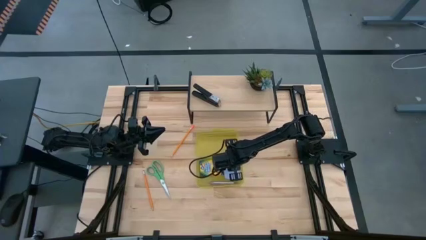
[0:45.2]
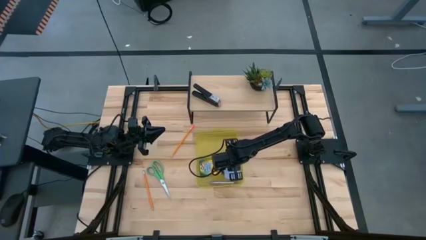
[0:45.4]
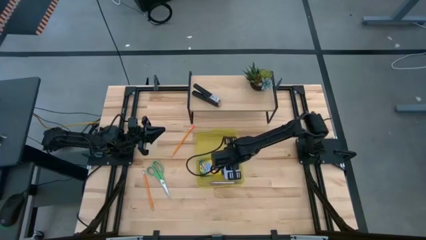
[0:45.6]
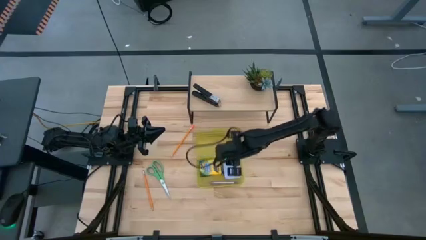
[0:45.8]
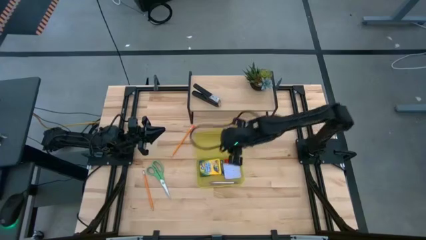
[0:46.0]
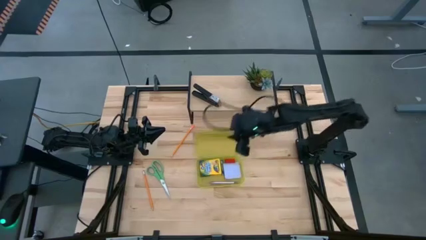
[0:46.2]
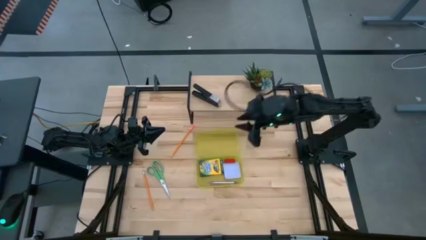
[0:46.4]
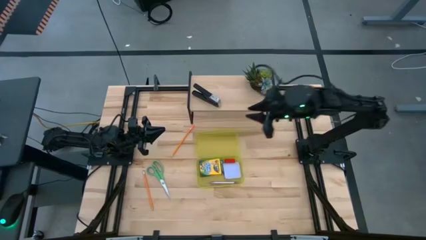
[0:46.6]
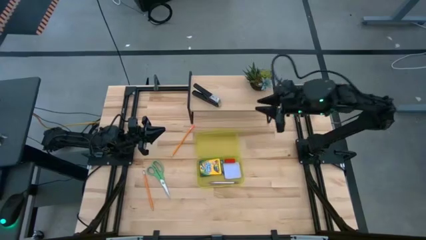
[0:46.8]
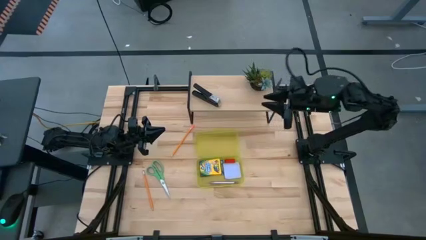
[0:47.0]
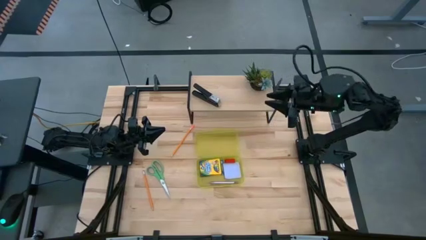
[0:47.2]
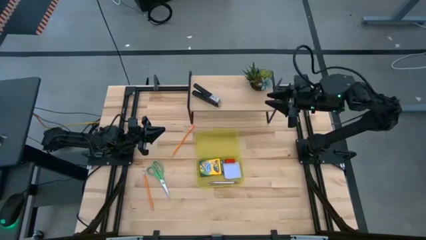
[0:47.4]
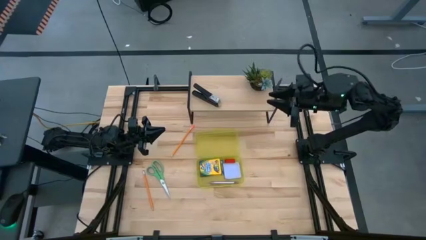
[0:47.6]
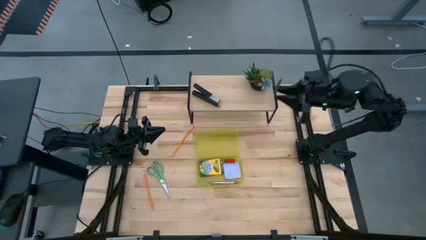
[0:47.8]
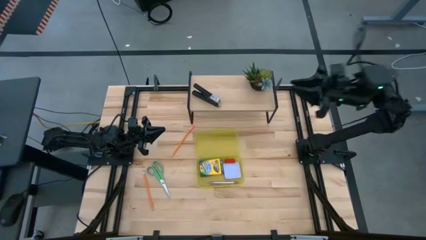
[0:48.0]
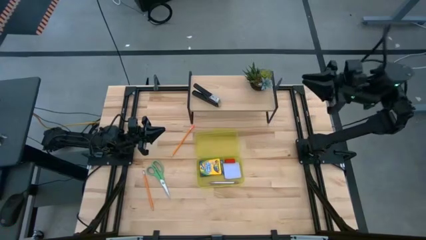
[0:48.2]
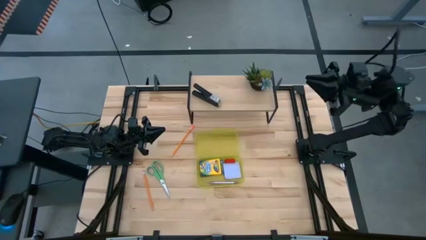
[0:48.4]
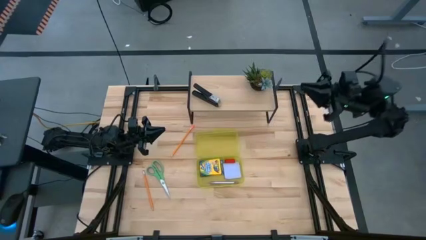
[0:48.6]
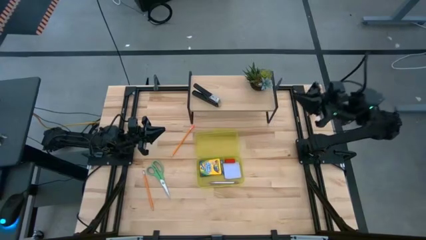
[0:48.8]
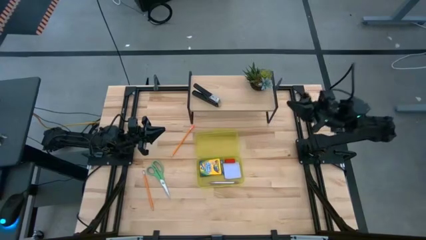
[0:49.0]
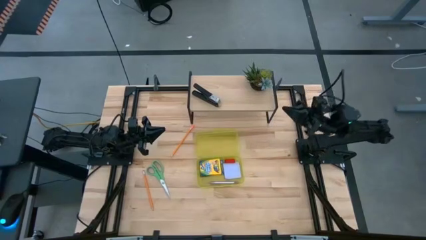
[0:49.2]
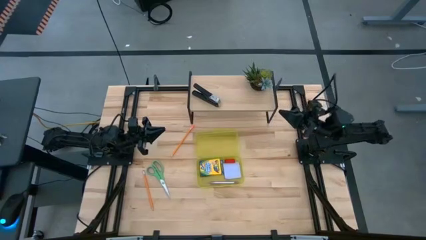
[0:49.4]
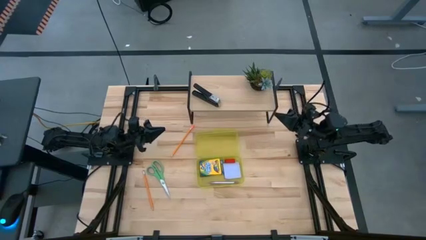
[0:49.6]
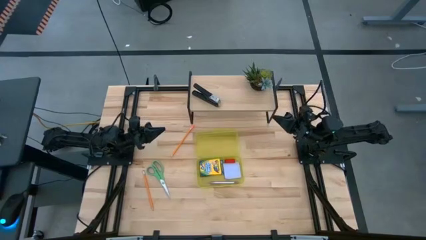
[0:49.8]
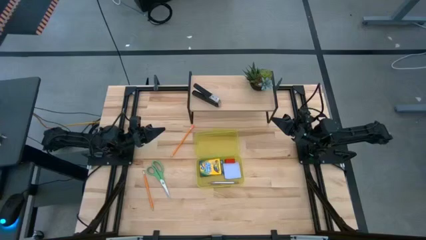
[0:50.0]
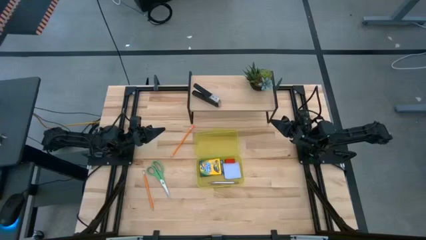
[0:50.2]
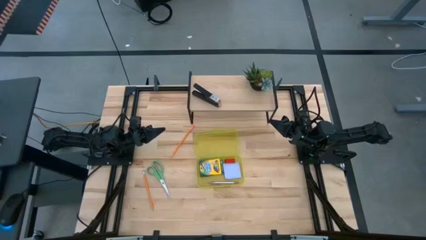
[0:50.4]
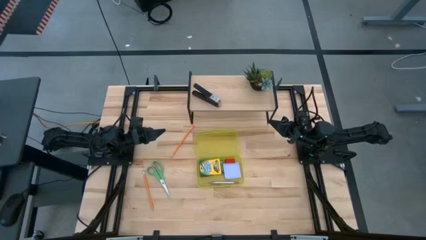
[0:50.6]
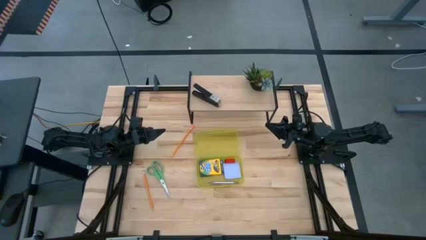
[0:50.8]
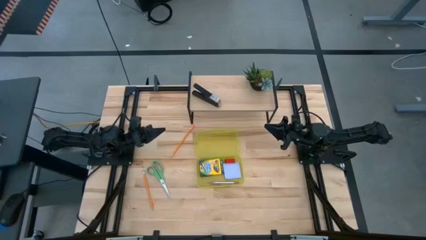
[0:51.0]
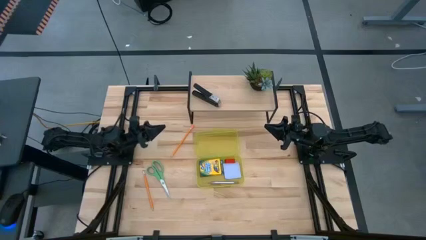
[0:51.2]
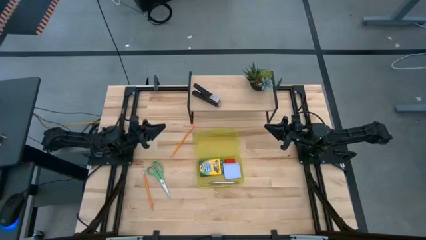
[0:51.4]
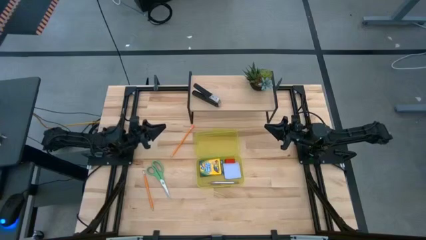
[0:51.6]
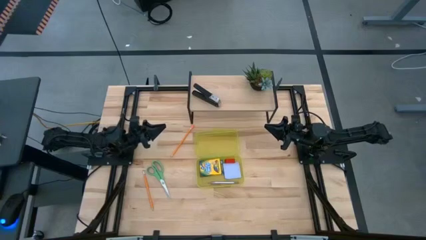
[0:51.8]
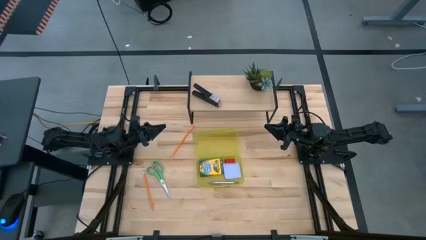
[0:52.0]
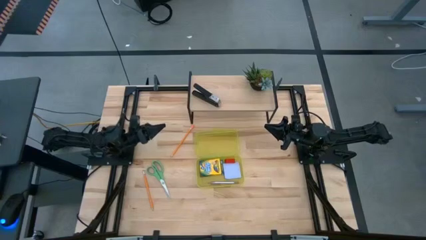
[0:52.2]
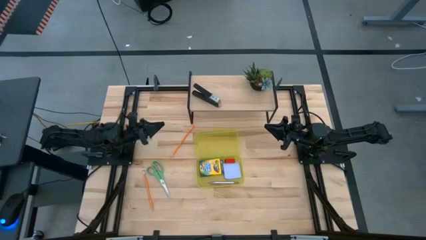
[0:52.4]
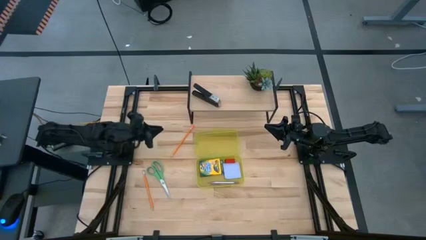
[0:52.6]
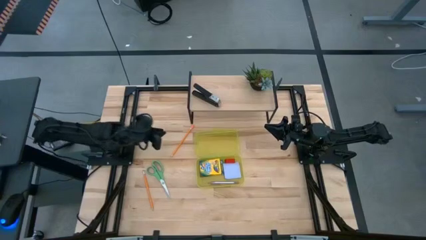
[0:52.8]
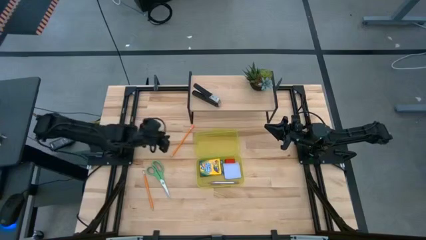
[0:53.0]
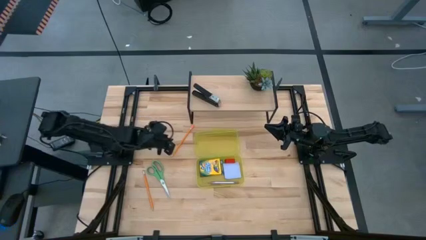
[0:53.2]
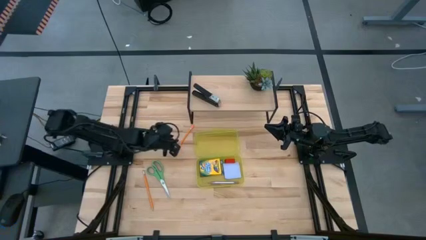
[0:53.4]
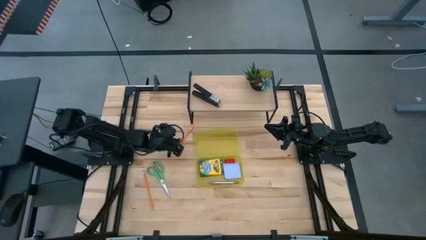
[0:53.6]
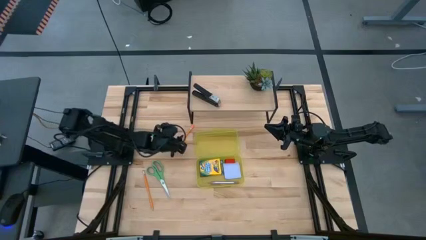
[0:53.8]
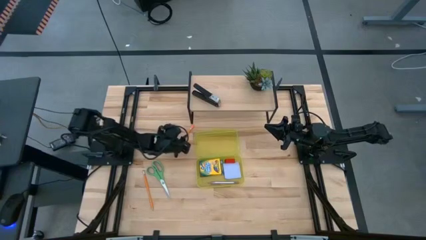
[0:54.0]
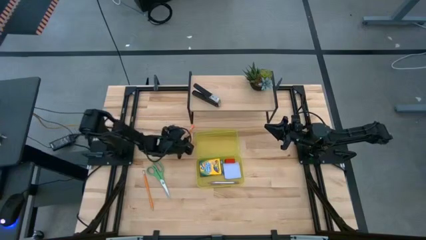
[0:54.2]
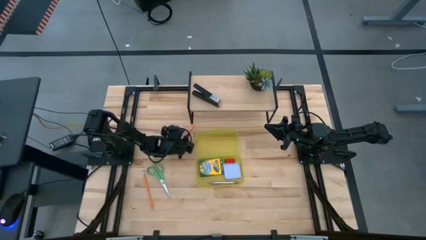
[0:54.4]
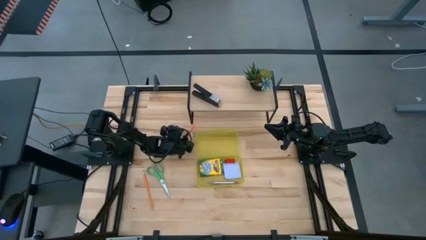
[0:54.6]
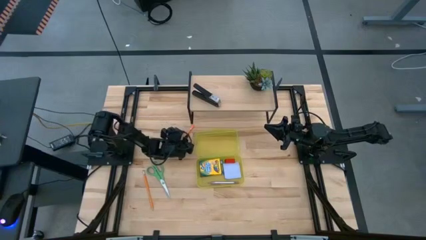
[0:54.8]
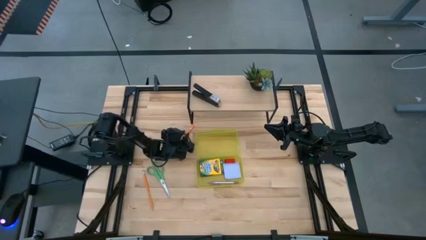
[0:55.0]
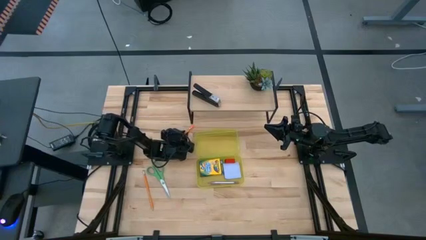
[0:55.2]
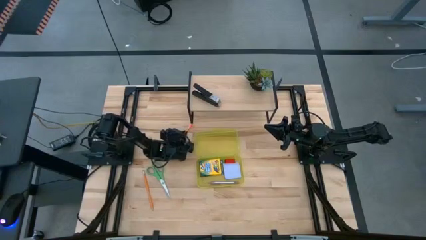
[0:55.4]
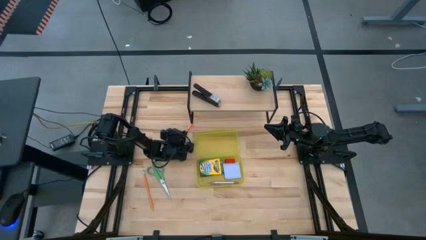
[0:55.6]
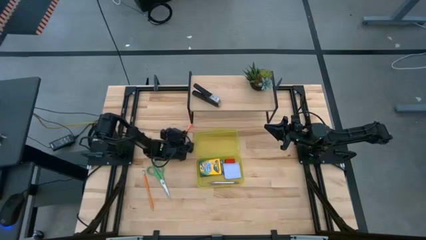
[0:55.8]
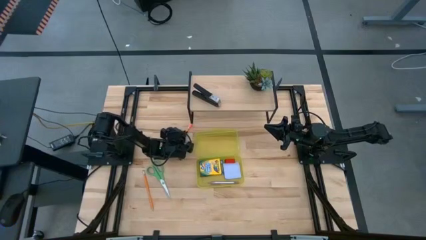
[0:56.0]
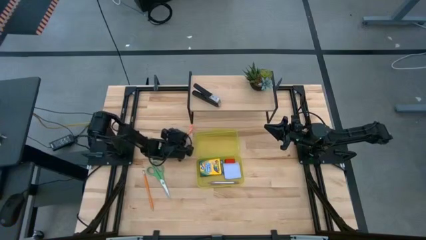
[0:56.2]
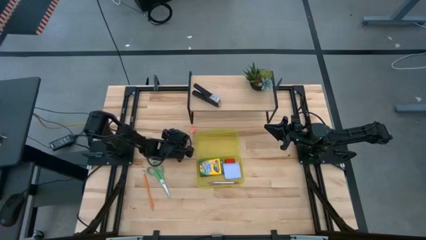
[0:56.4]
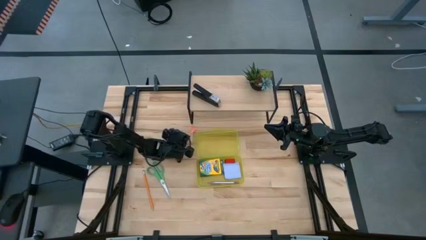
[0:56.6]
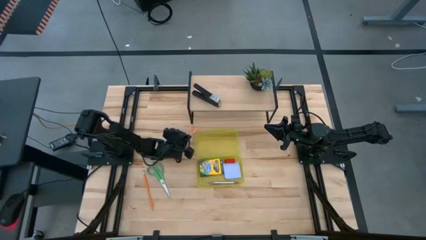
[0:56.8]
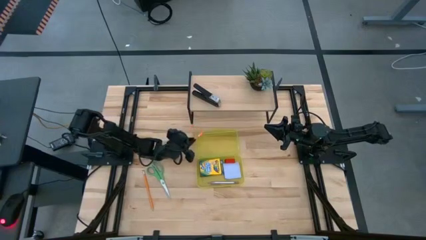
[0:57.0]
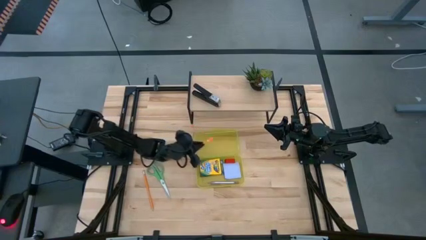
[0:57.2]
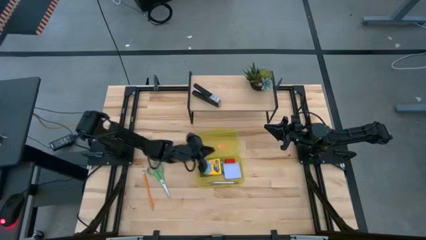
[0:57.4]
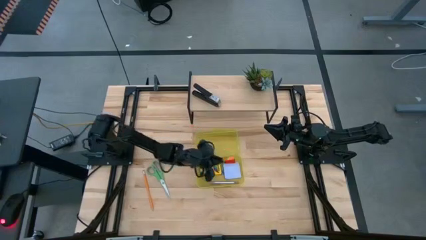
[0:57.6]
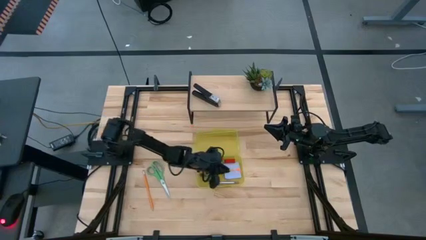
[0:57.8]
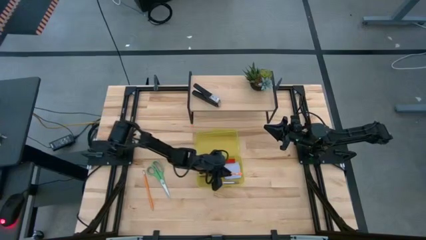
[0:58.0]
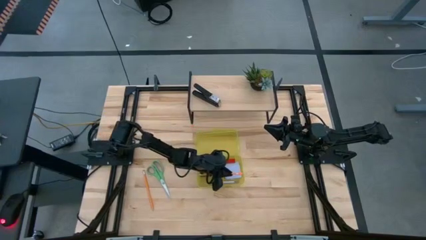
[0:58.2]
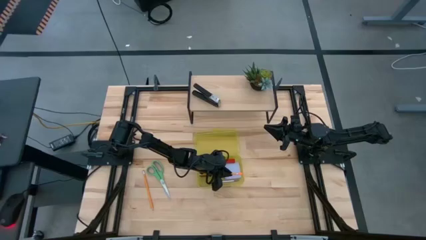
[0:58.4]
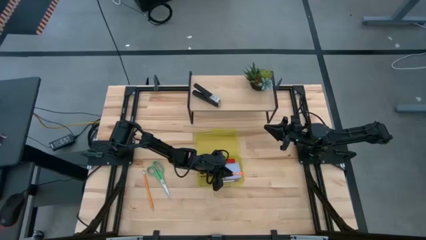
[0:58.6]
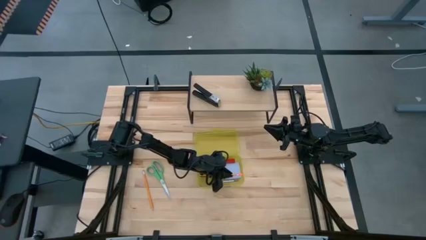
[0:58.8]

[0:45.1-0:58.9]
Task: Pack school essentials
Put the top yellow pencil into the yellow supply box
